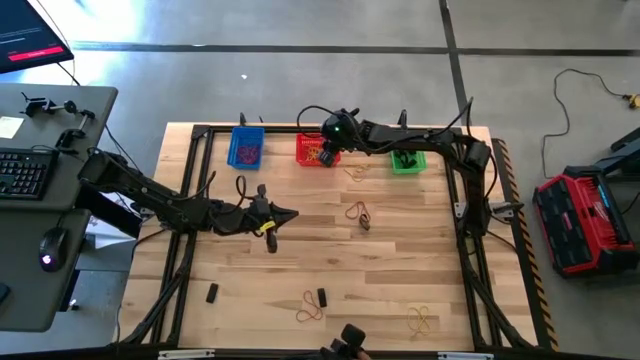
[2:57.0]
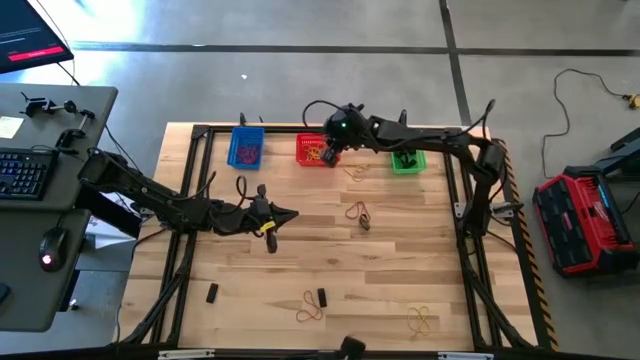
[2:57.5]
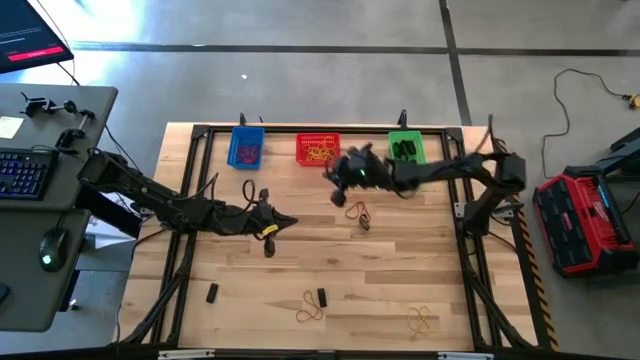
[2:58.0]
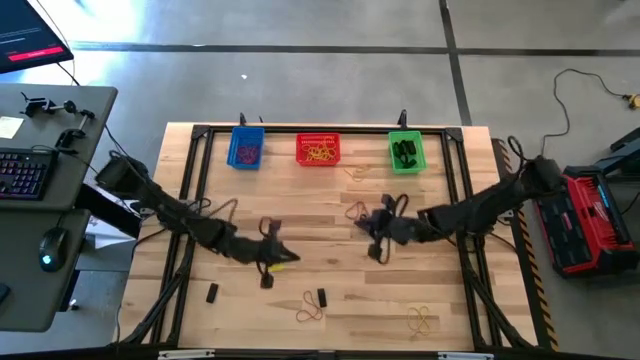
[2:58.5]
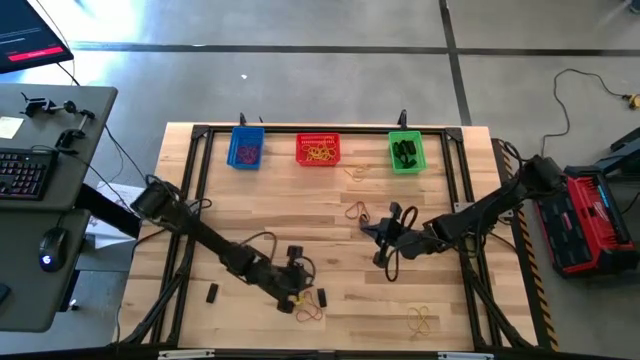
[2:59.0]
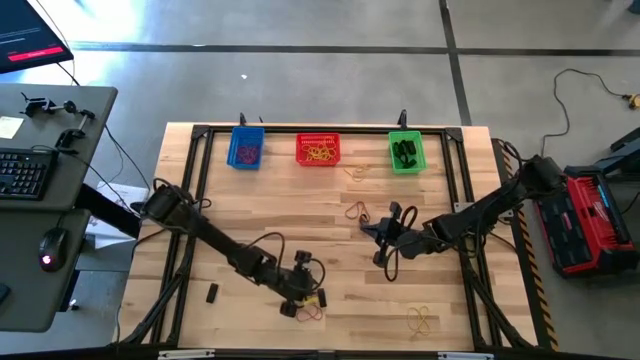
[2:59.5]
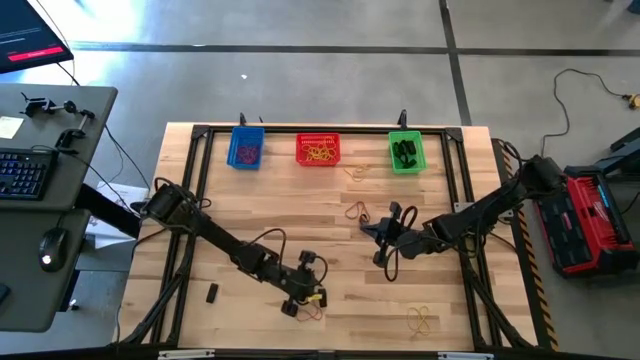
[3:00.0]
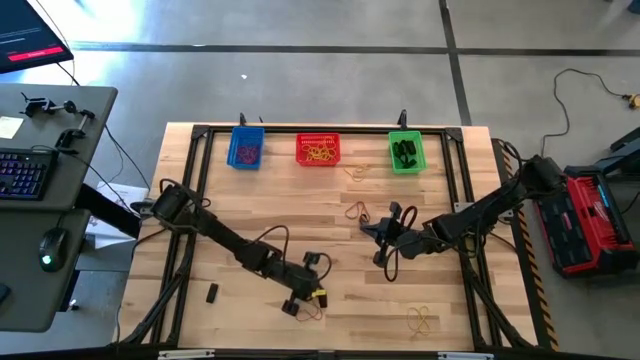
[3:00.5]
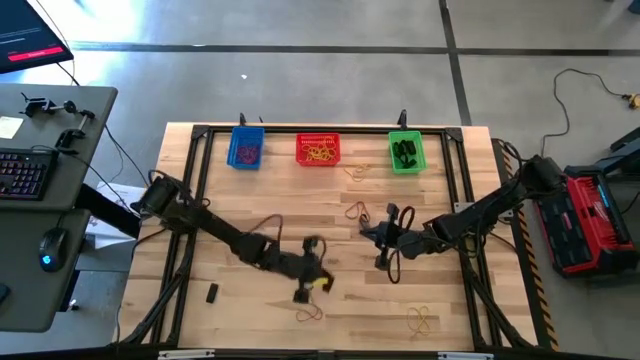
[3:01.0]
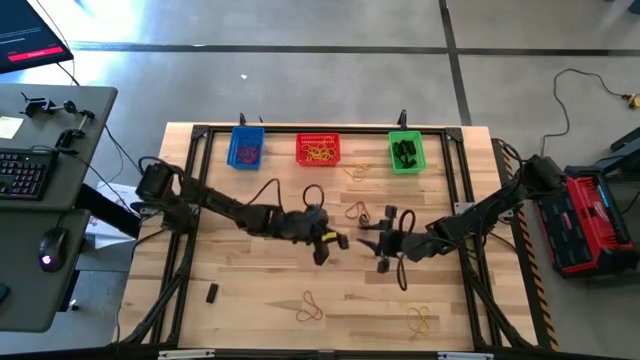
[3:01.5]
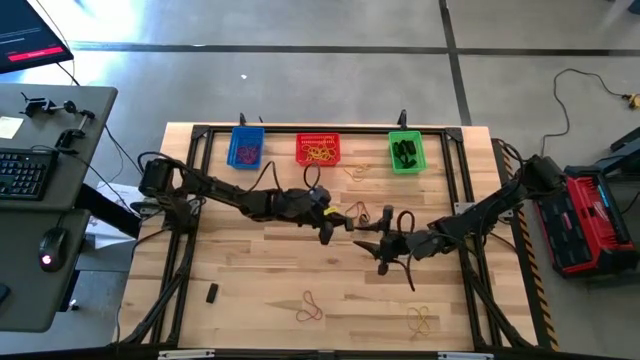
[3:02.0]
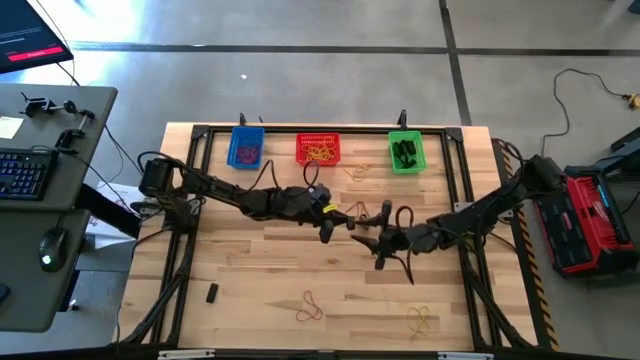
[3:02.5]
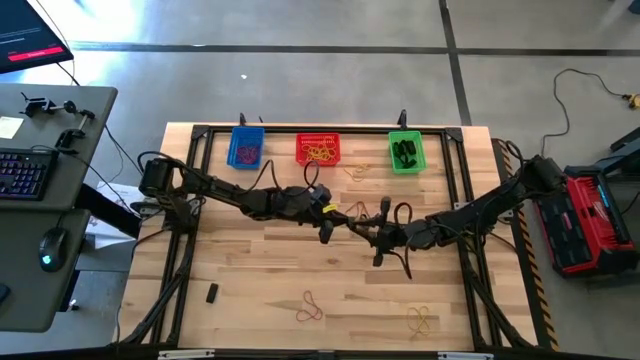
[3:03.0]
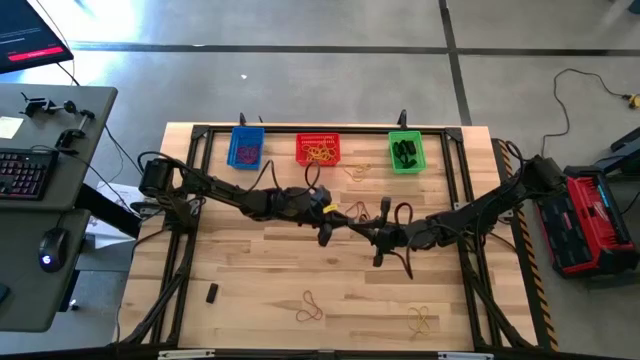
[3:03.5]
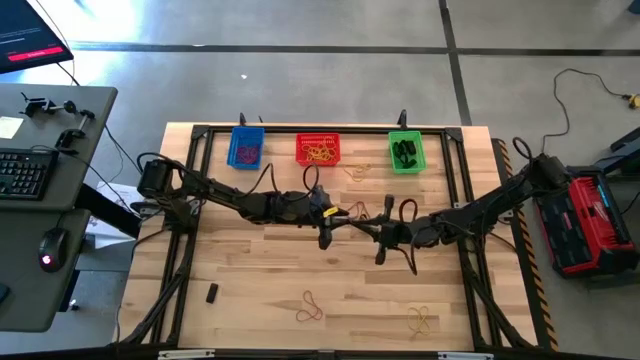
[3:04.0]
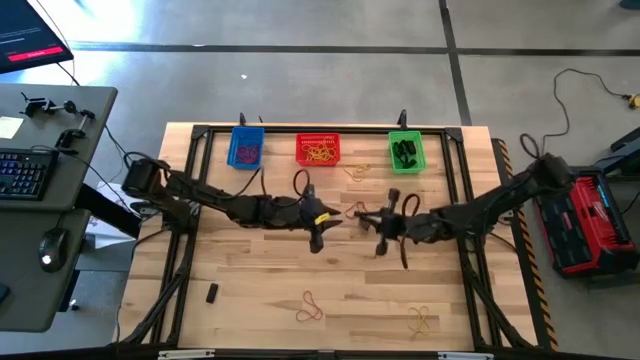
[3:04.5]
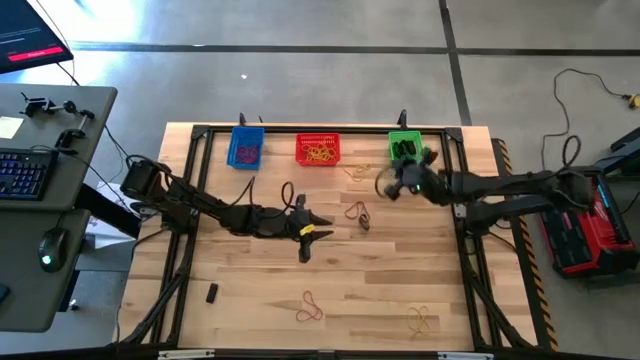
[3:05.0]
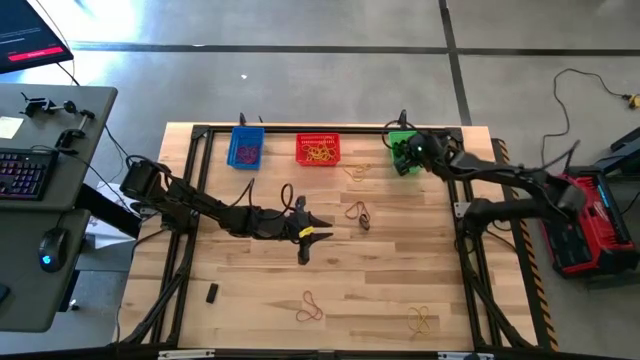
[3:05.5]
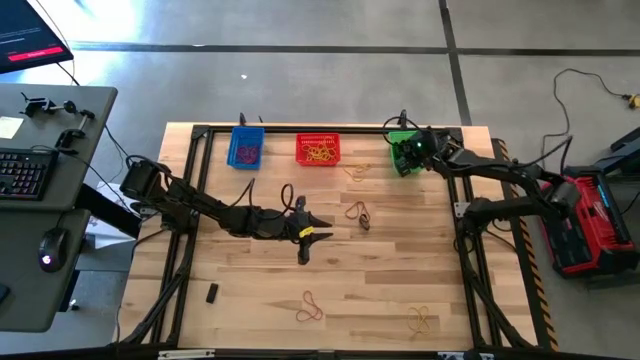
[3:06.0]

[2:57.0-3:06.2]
Task: Sort rubber bands into baskets
Put the black rubberband into the green bin

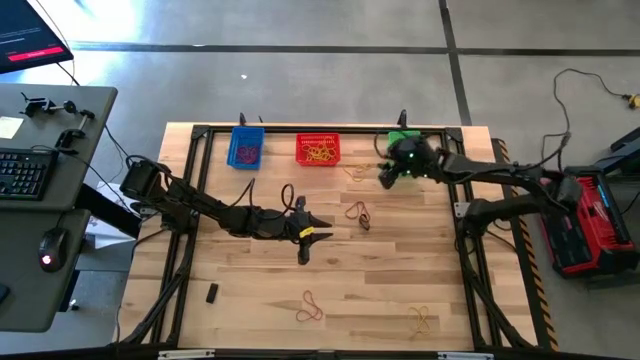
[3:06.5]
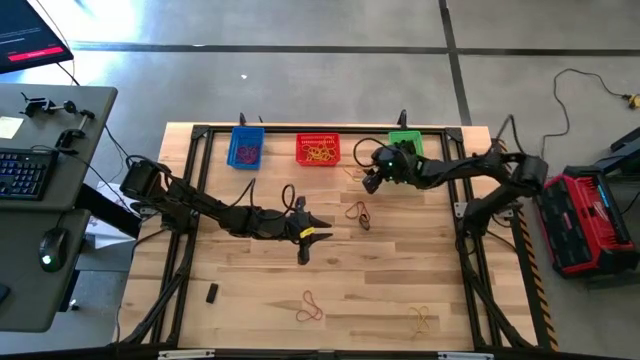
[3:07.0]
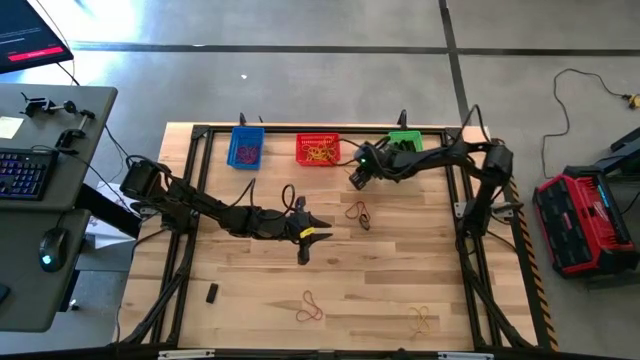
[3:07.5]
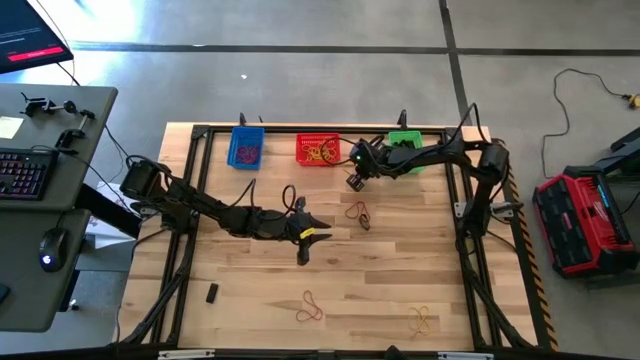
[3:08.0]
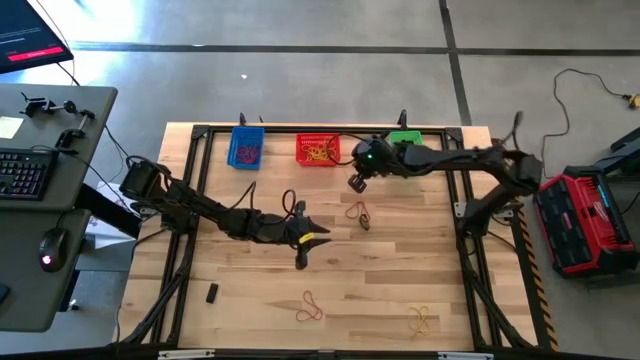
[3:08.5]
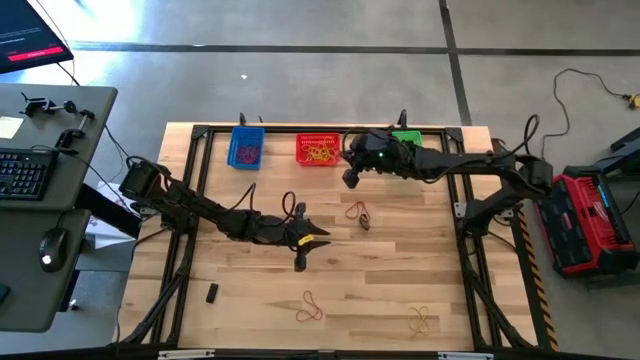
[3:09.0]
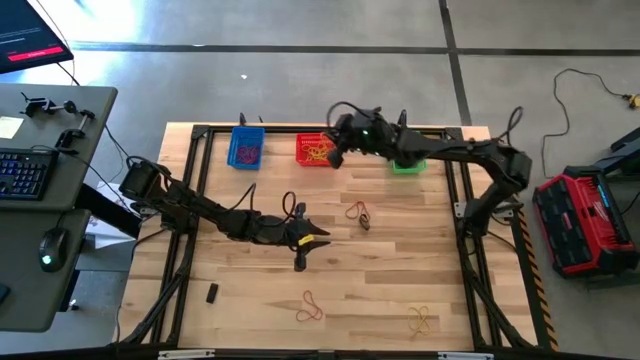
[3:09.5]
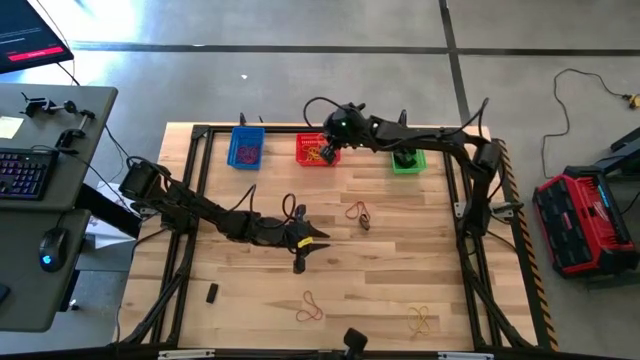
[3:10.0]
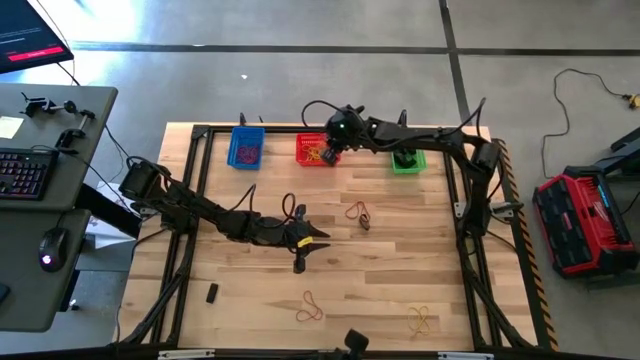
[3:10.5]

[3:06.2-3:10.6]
Put the yellow rubberband into the red bin

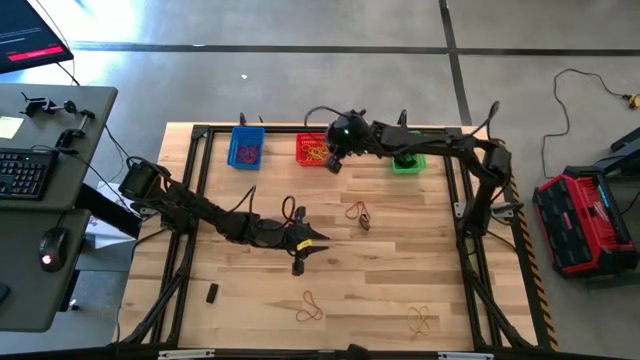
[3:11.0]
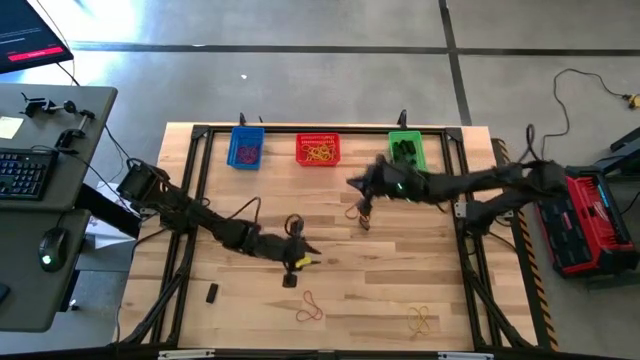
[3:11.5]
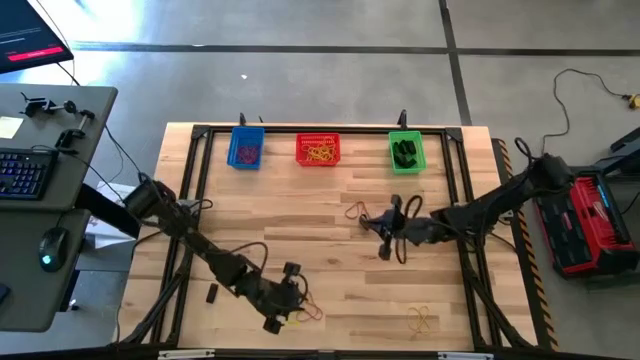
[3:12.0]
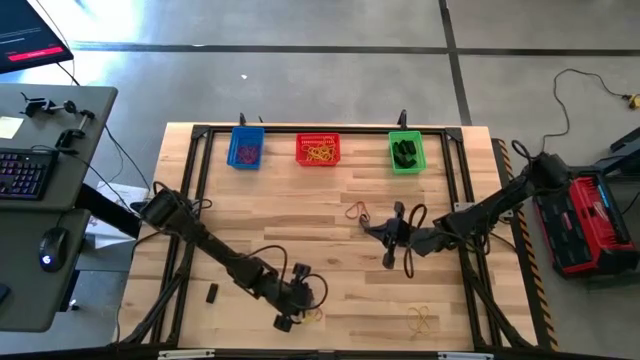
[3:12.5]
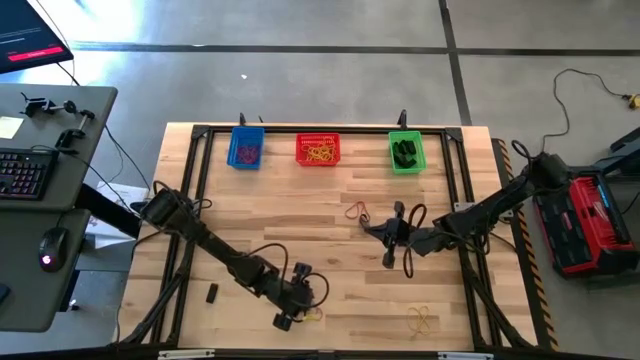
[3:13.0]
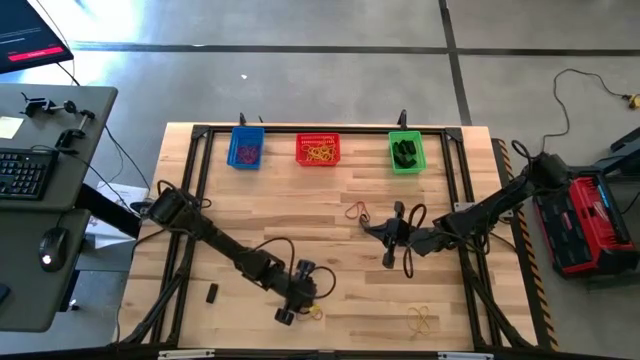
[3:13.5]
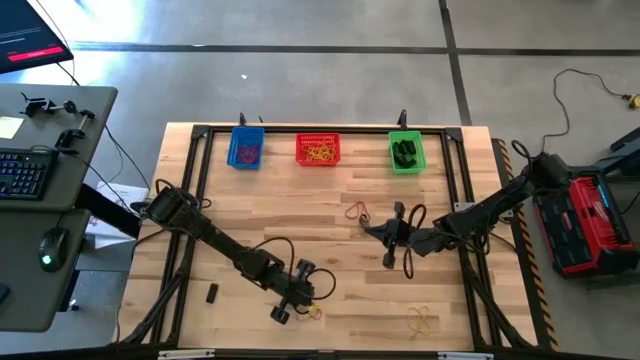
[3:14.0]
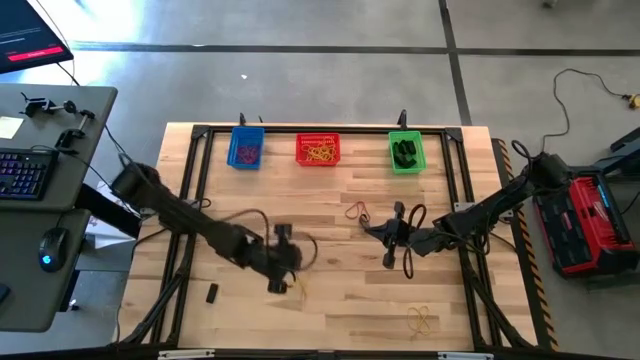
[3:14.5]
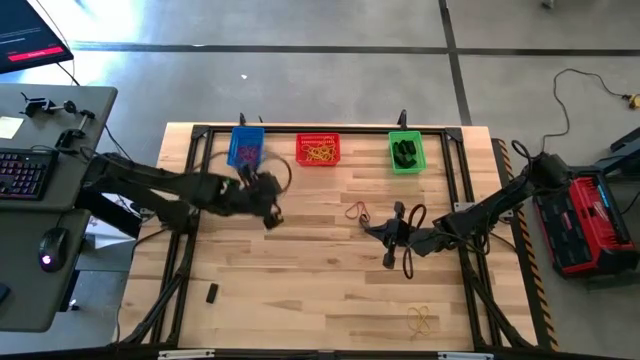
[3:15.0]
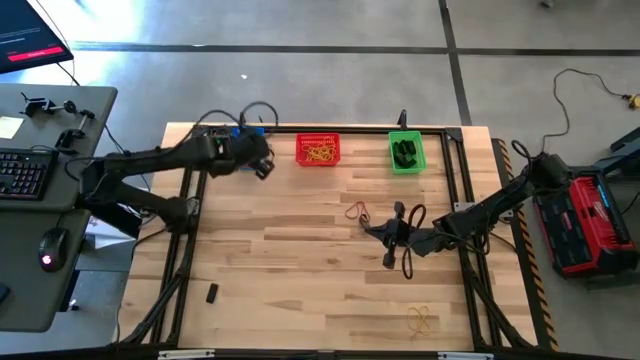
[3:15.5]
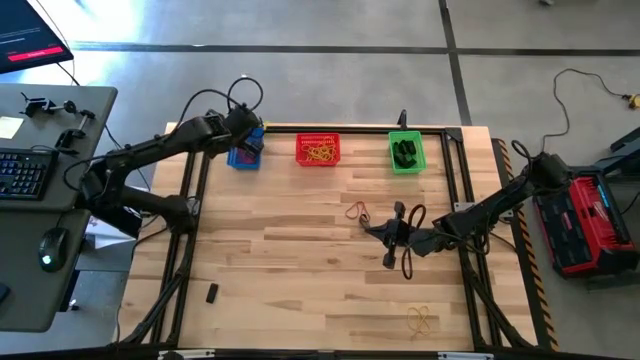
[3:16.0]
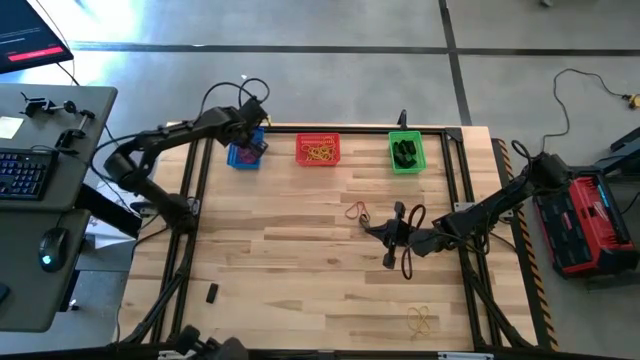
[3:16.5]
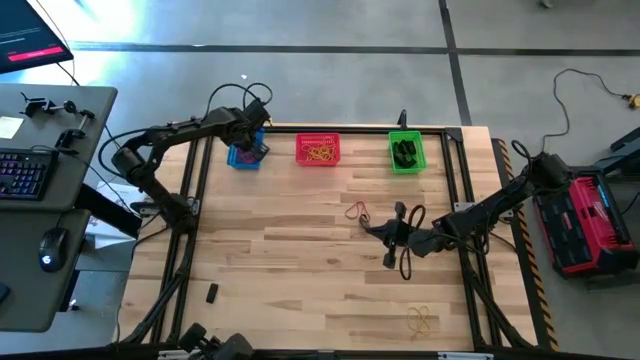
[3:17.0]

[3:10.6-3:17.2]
Put the orange rubberband into the blue bin
